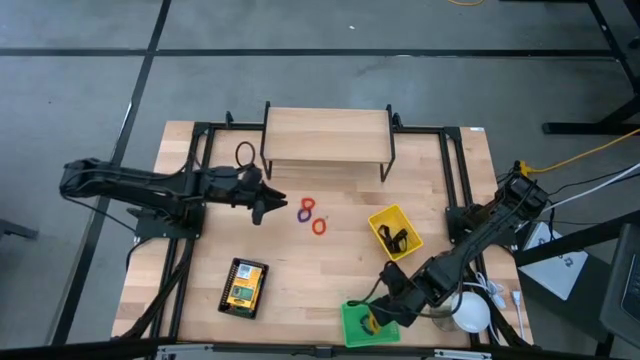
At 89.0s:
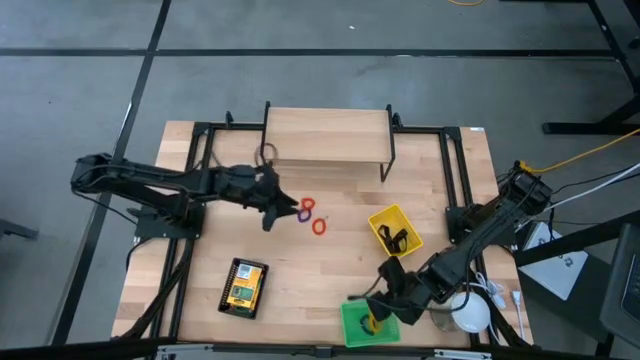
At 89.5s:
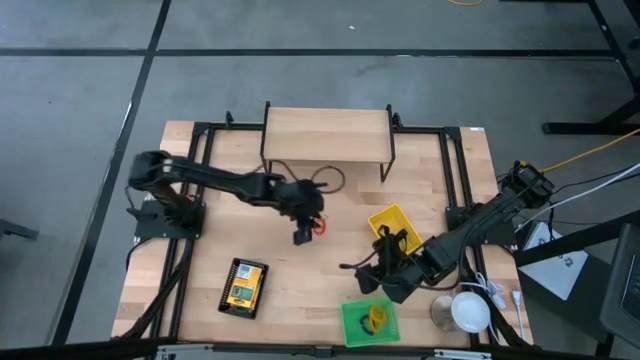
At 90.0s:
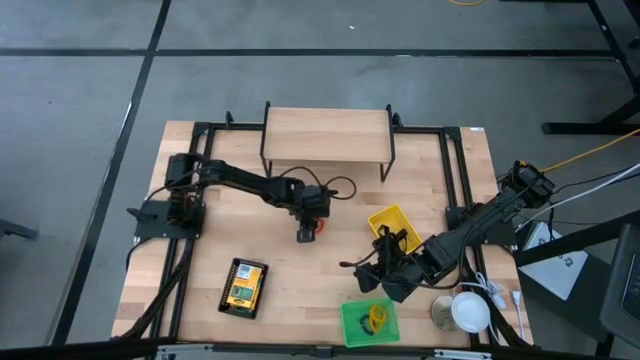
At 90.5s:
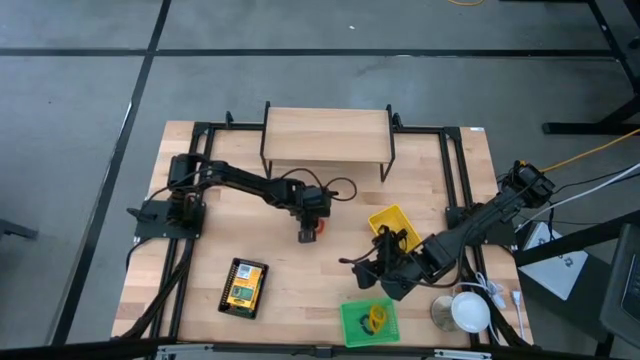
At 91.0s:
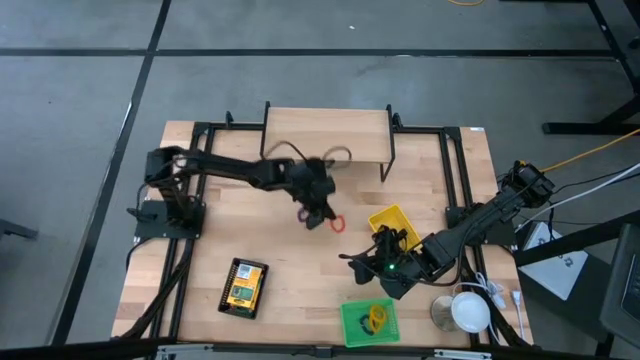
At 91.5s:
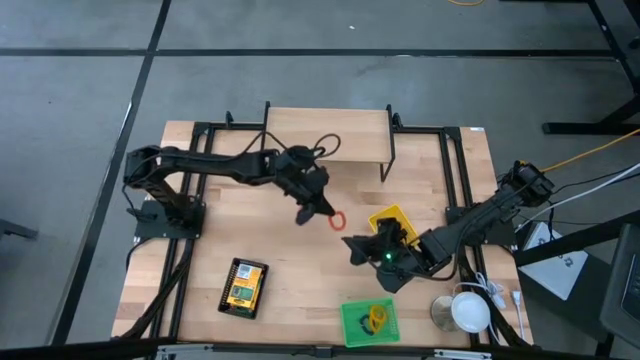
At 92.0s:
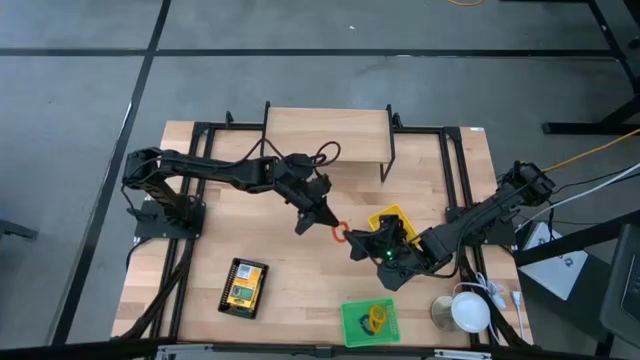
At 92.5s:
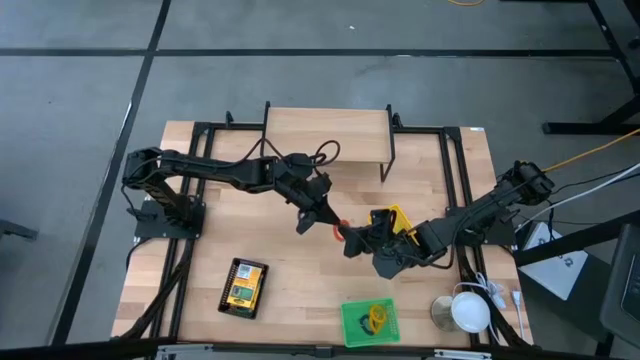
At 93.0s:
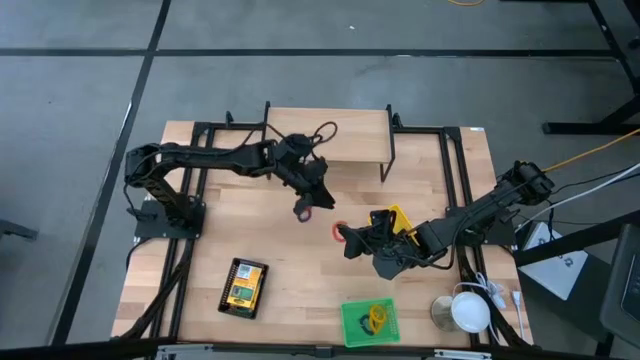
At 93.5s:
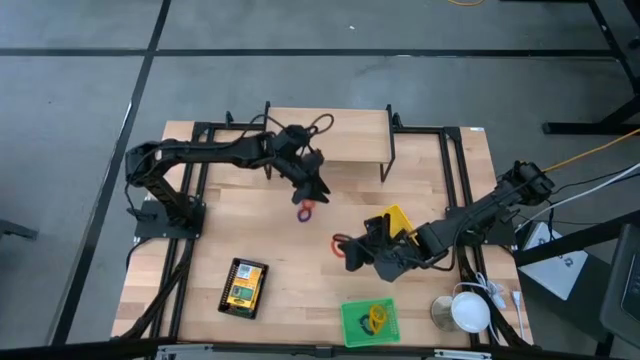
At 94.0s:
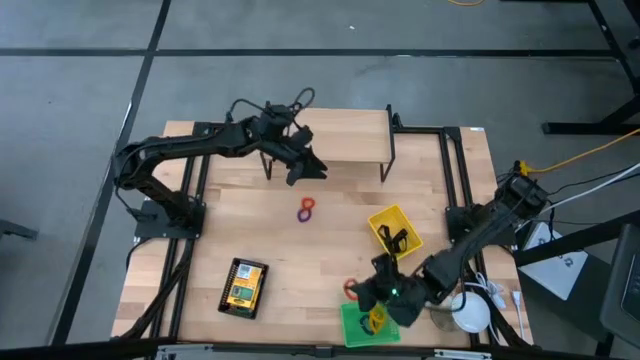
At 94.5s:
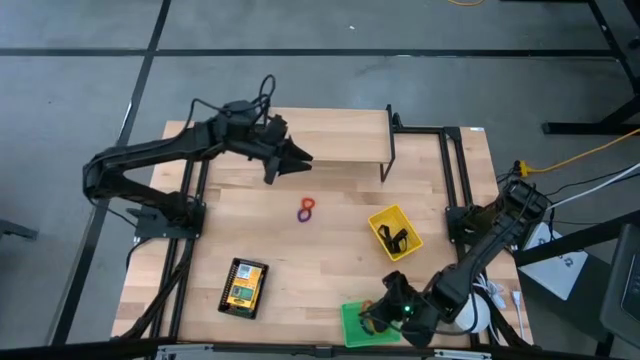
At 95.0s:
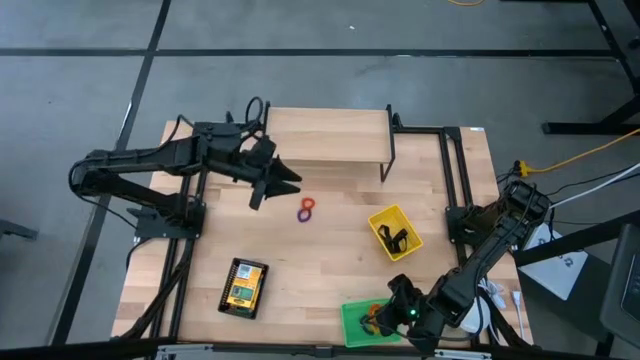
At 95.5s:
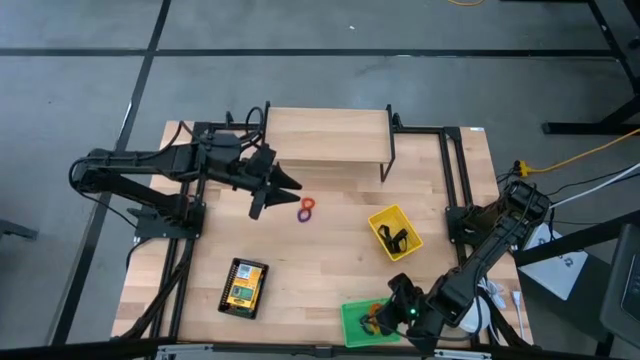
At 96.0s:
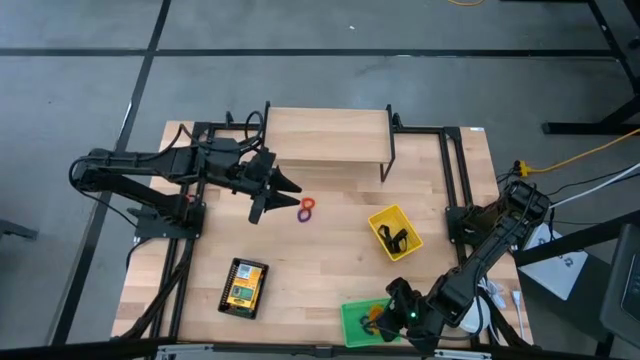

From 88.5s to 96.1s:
Task: Pick & Place Office Desk Supplies
Put the orange spring keychain into the green basket

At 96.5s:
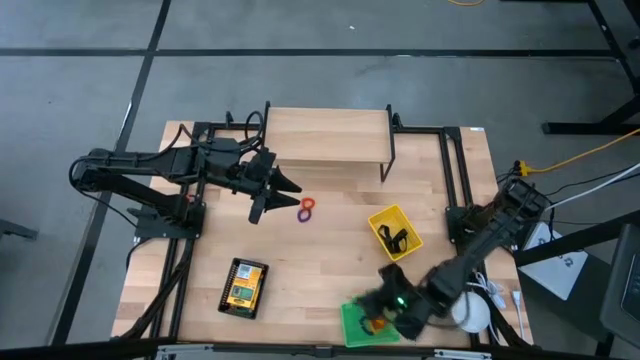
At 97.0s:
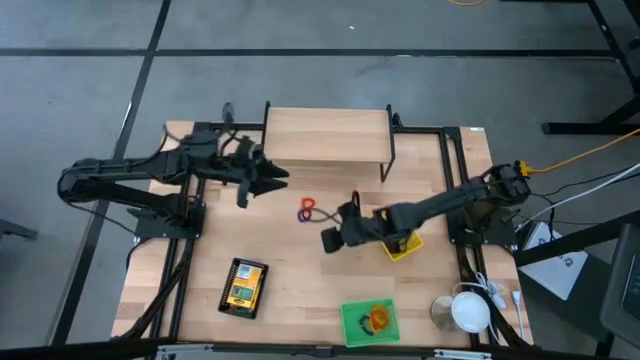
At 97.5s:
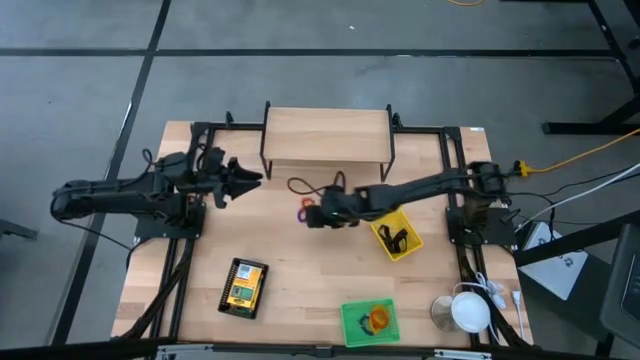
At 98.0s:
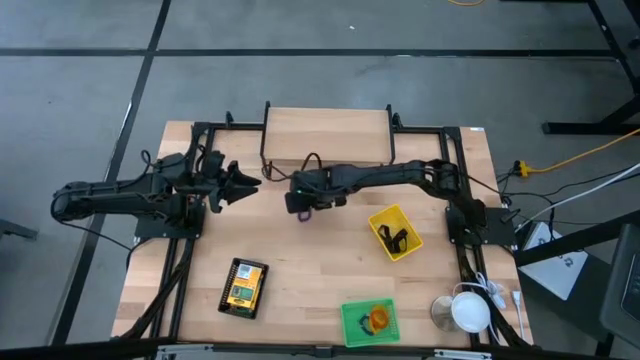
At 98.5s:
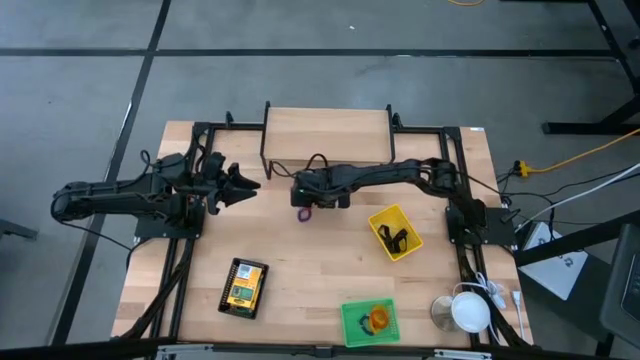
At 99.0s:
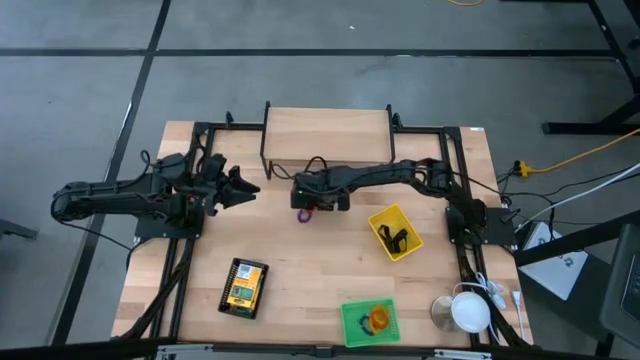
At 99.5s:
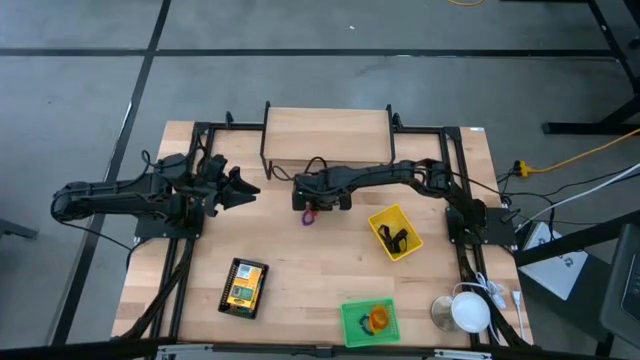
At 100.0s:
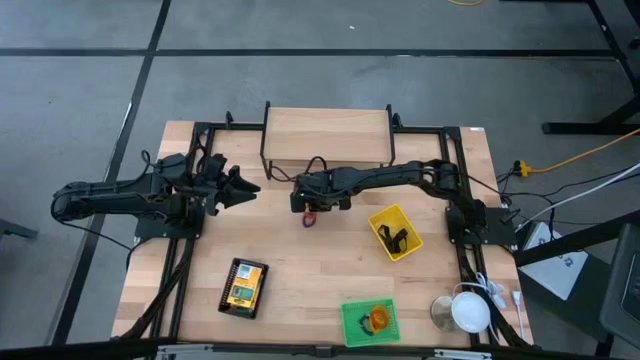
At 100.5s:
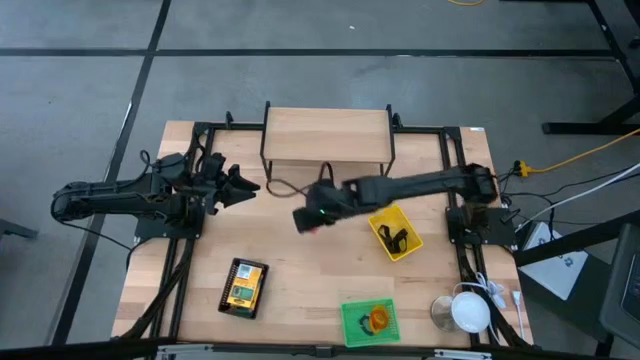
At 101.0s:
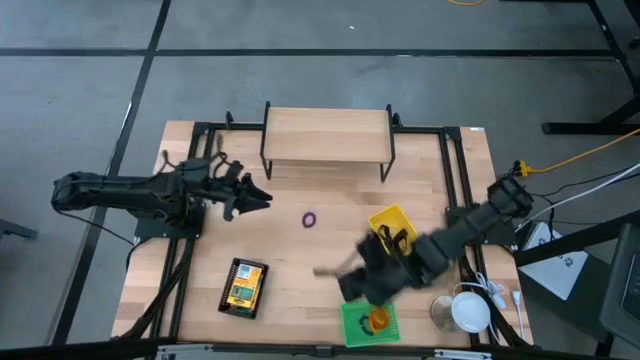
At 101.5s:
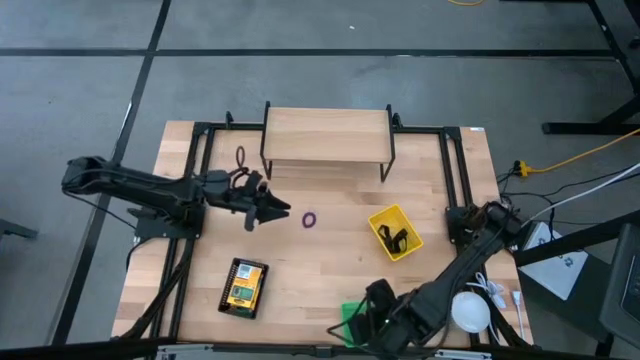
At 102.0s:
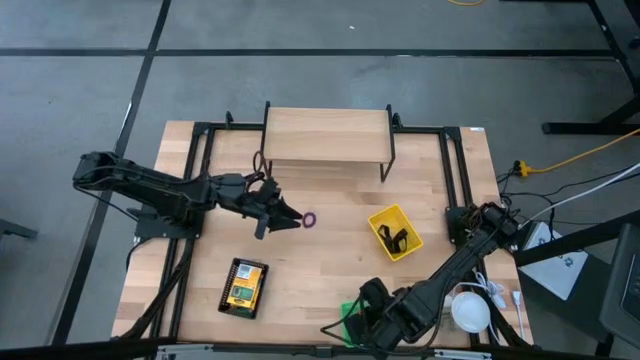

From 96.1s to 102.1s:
Put the orange spring keychain into the green basket

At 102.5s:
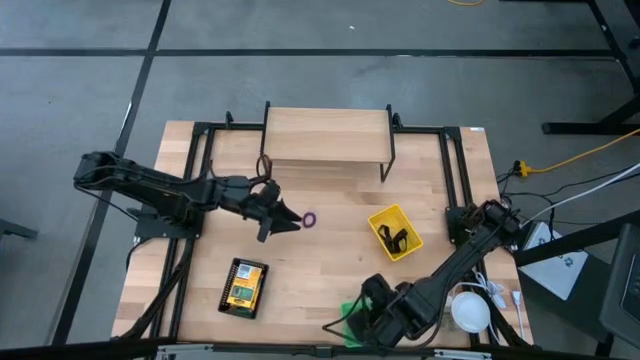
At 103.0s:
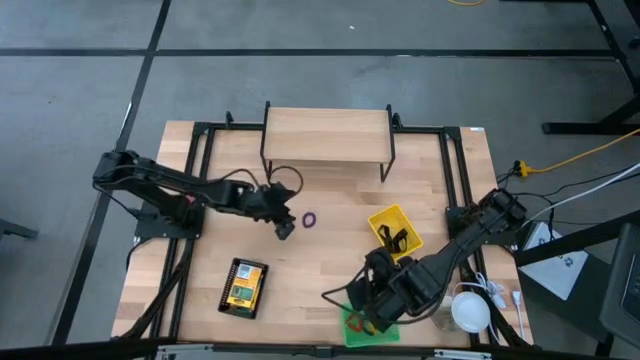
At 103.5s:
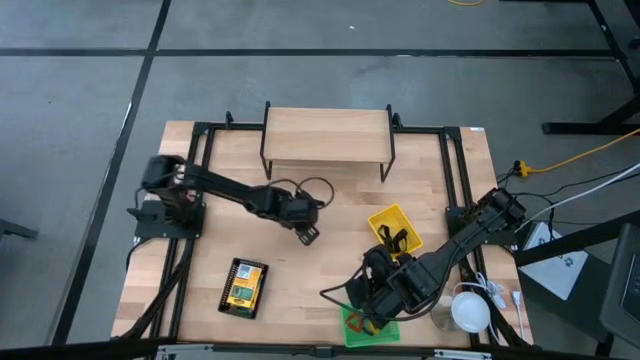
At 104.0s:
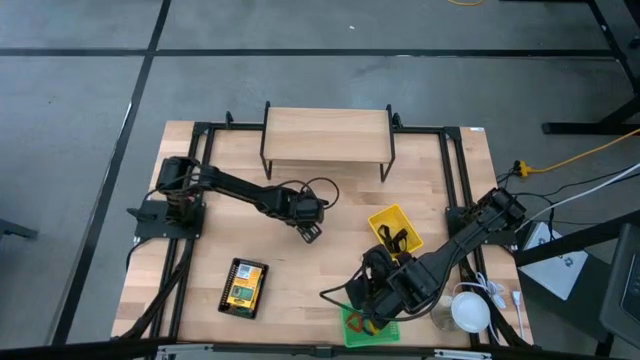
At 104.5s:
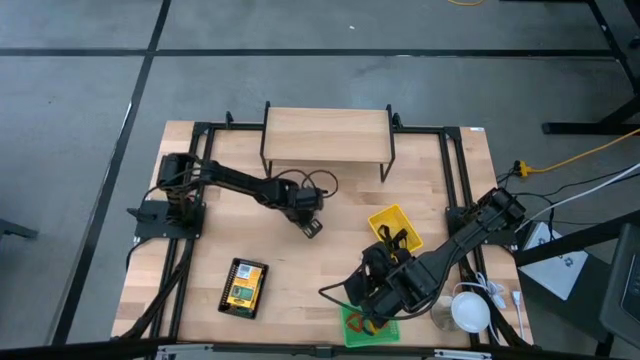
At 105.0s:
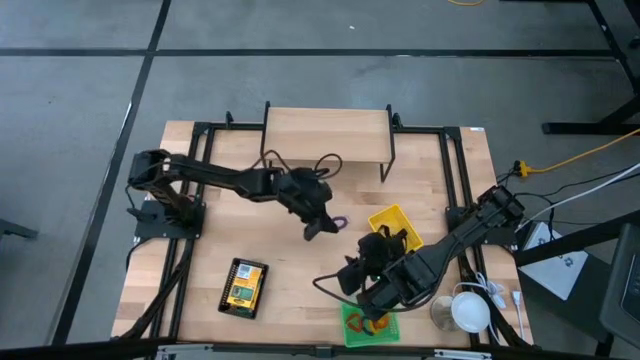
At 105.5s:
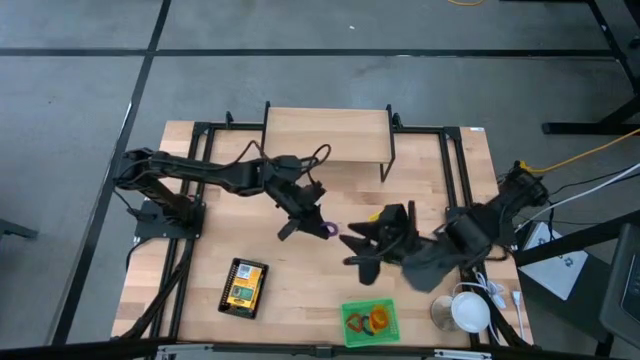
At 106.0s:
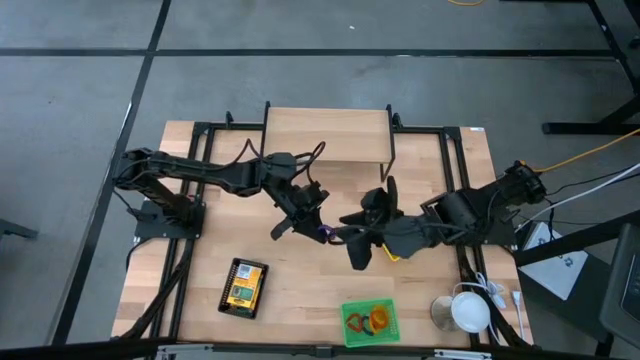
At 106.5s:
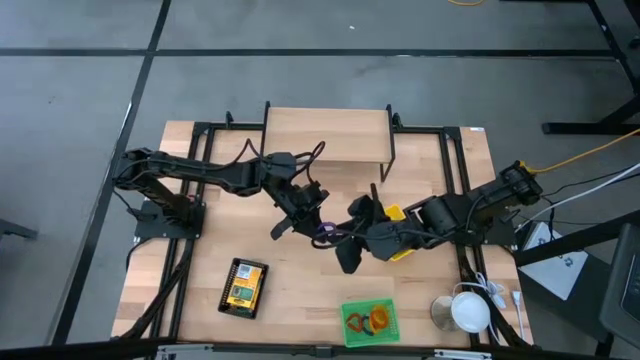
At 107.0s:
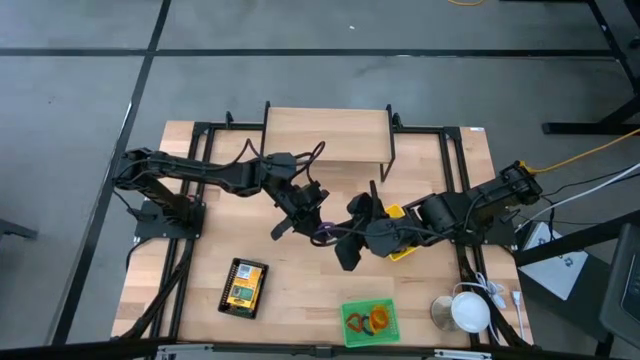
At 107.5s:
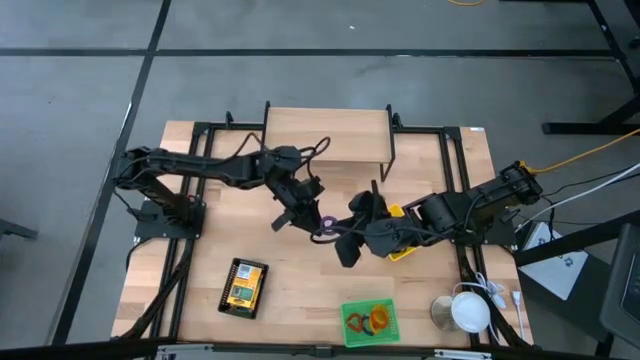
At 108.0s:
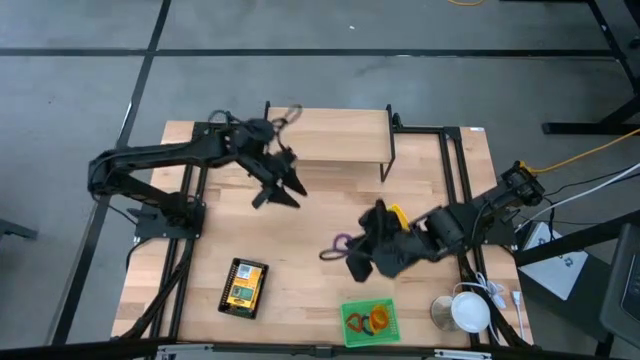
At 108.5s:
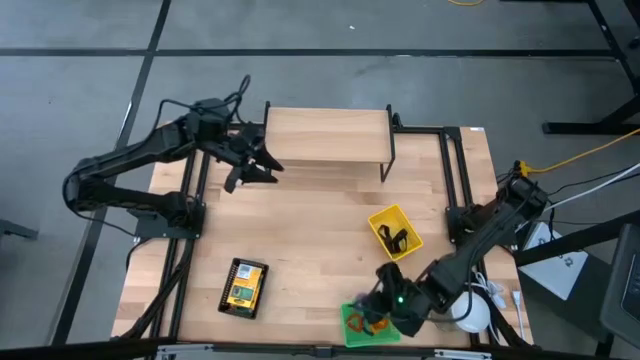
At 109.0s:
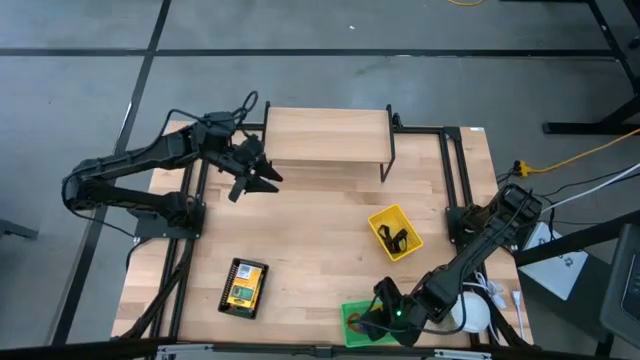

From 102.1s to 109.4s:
Put the purple spring keychain into the green basket

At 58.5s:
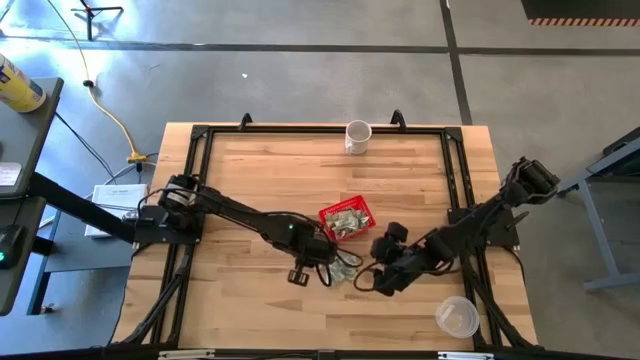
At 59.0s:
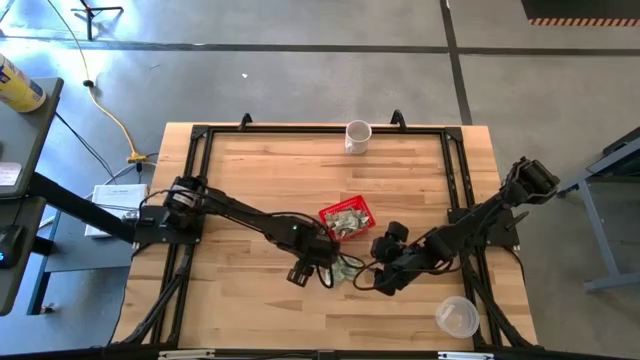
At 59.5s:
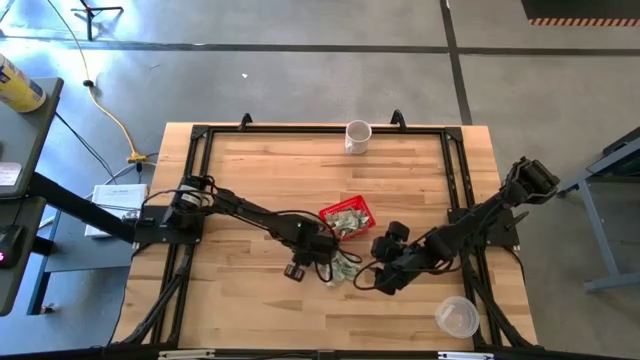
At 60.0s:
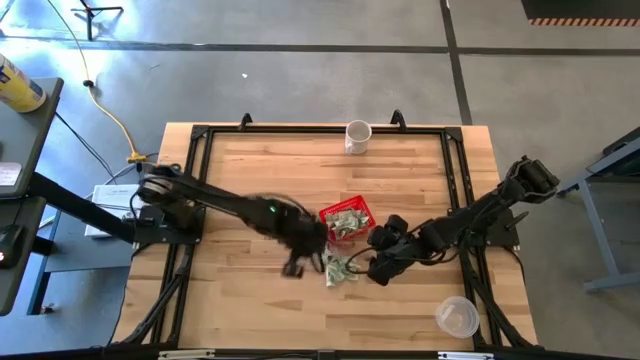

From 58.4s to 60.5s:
Task: Pick and place items into bin
Put the white stevia packet into the red bin
